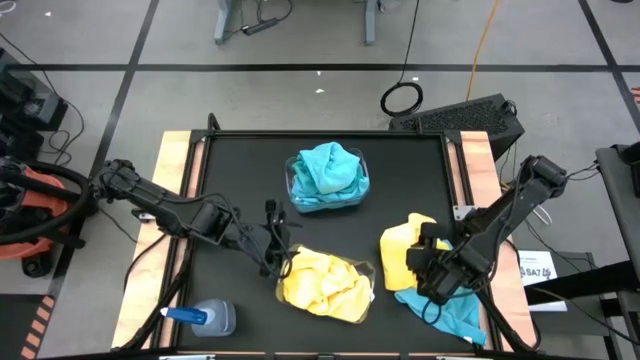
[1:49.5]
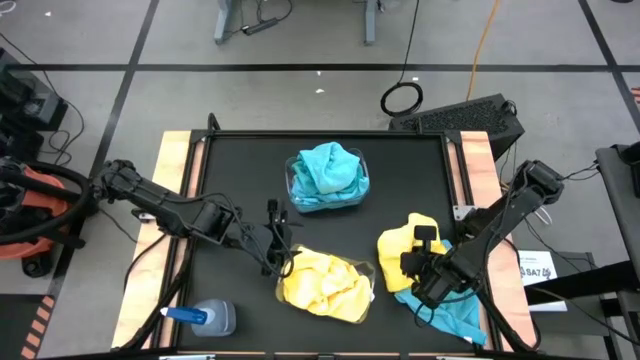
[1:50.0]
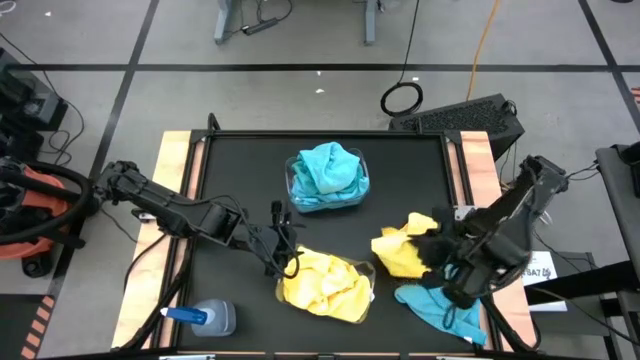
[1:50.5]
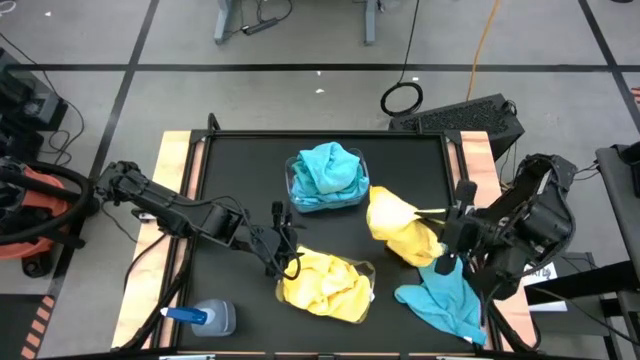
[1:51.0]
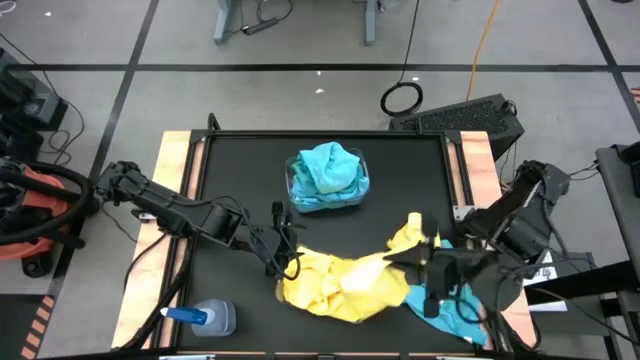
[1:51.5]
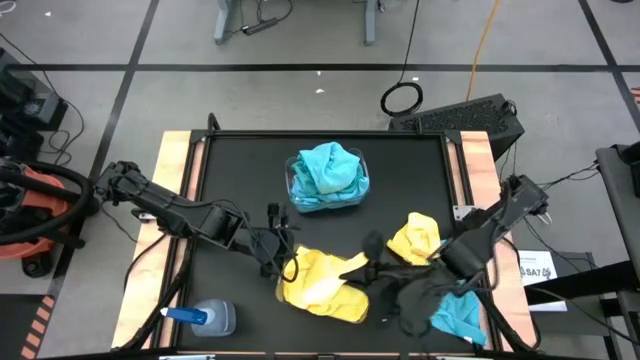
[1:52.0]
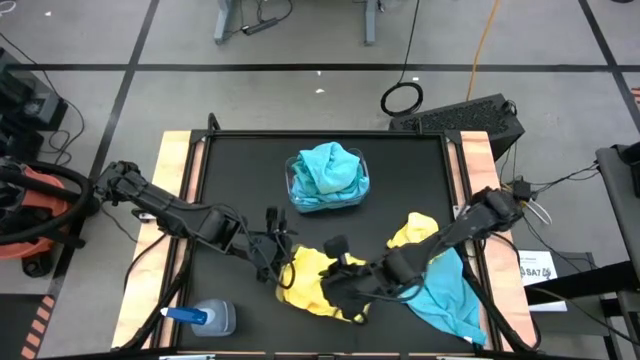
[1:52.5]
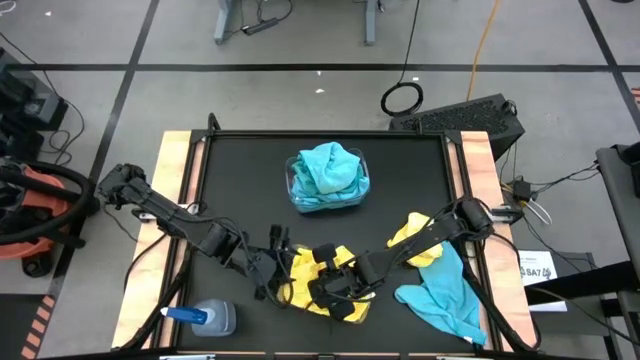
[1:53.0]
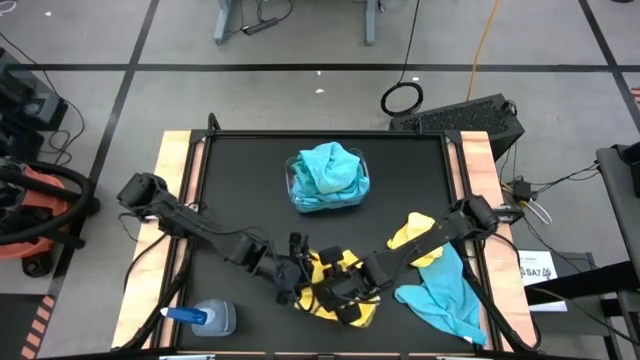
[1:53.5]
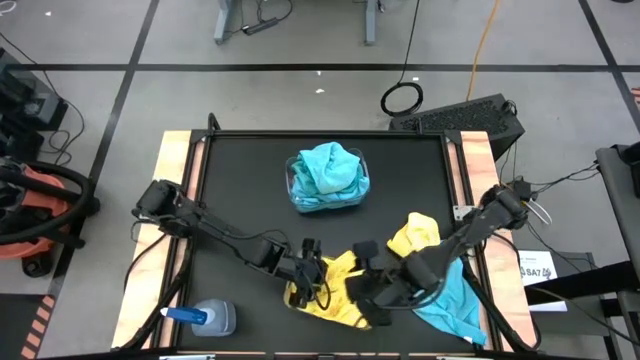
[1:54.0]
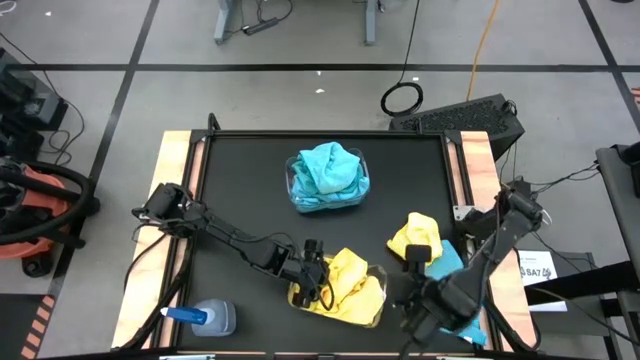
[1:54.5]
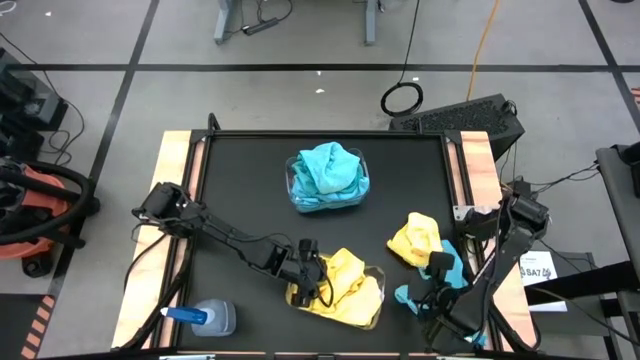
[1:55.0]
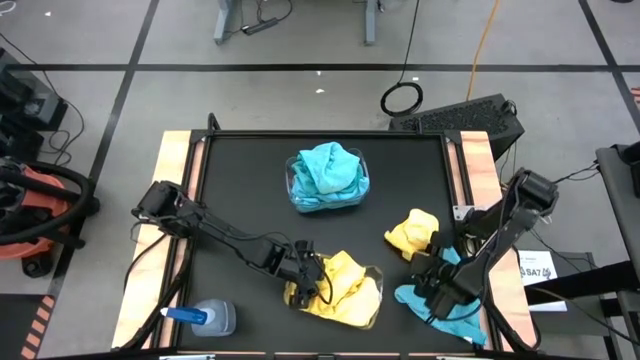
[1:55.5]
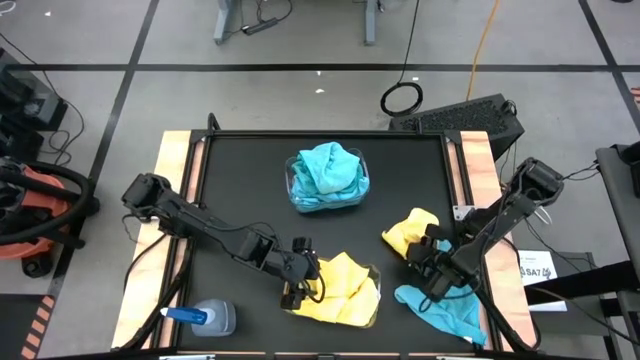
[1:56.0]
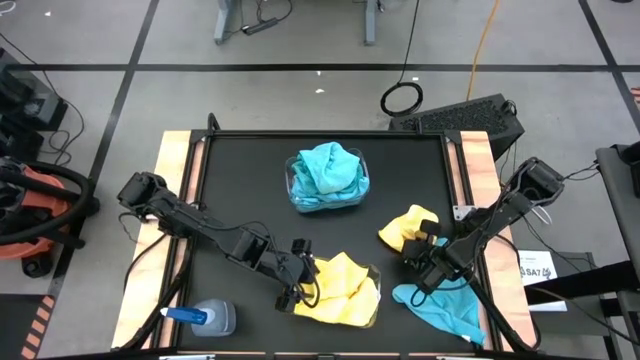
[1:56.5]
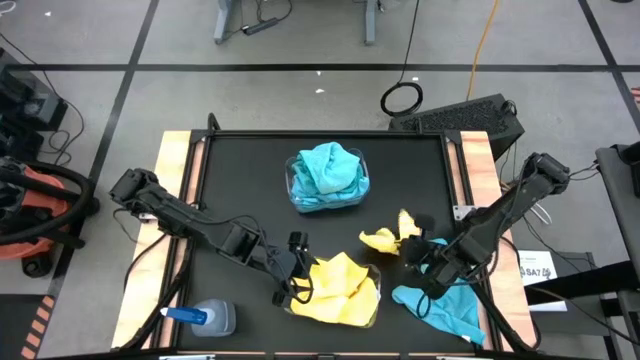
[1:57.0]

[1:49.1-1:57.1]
Task: Sort microfiber towel by color & place in baskets
Put the yellow microfiber towel into the bottom transparent bin

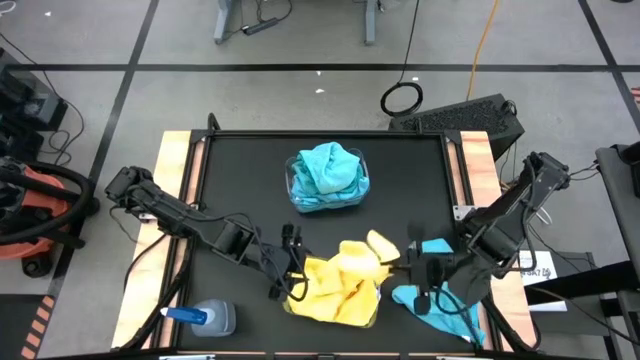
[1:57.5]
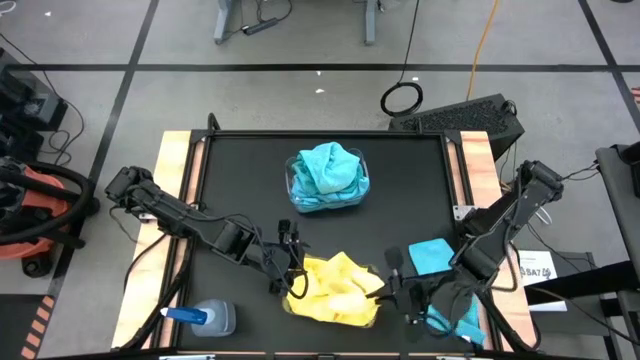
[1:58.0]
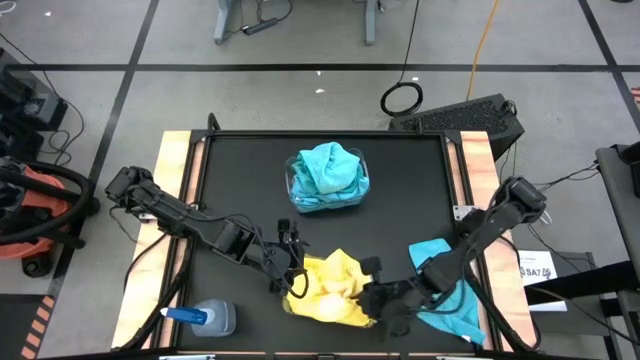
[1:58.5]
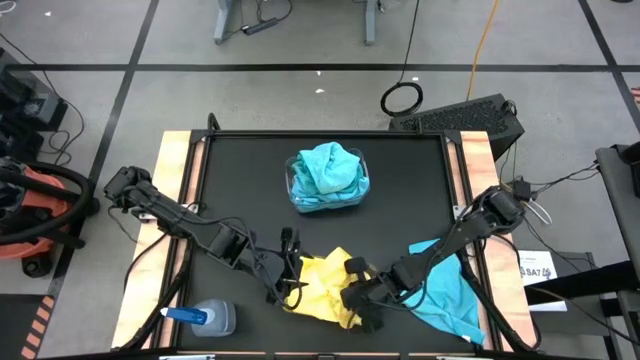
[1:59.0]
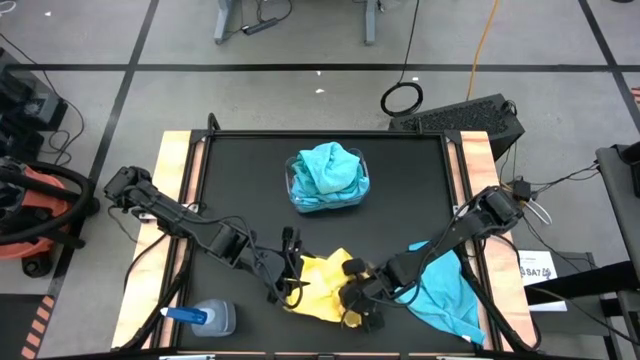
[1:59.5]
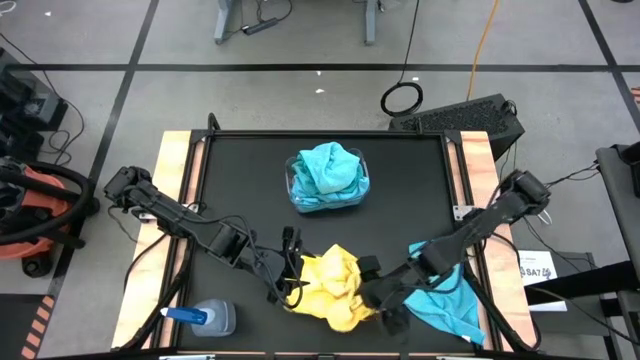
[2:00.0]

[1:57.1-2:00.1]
Put the yellow microfiber towel into the bottom transparent bin

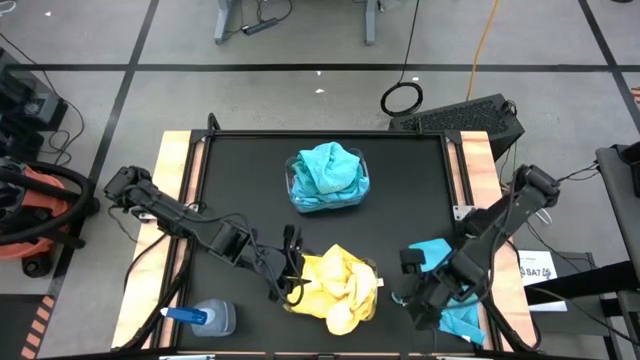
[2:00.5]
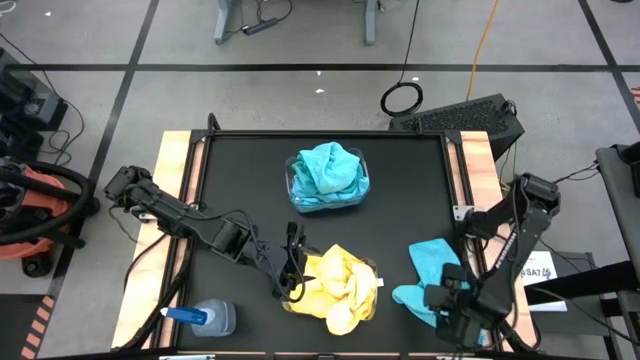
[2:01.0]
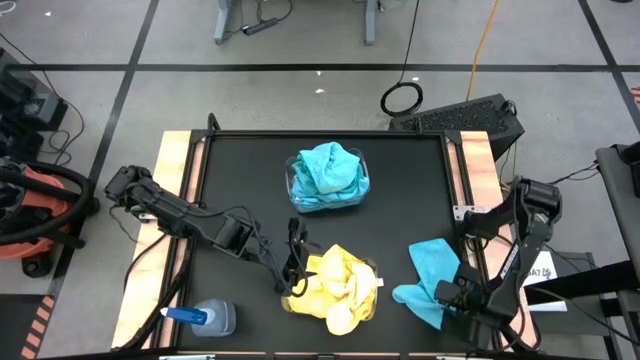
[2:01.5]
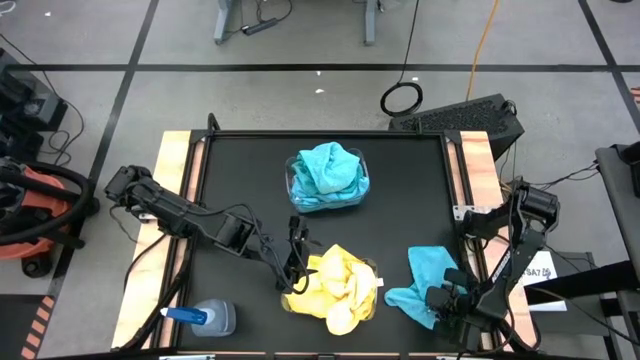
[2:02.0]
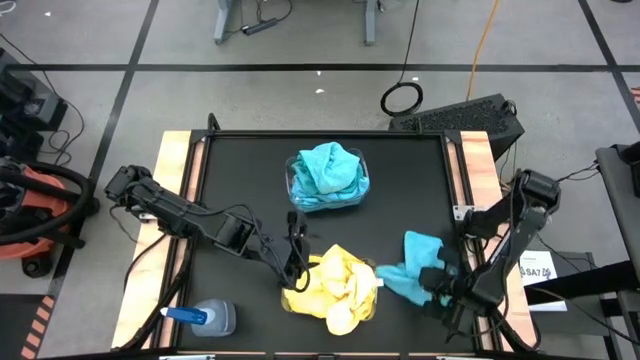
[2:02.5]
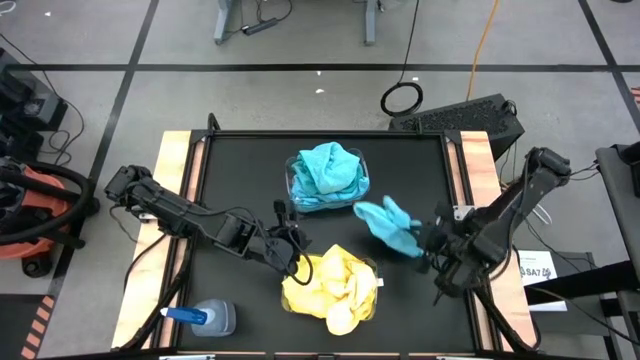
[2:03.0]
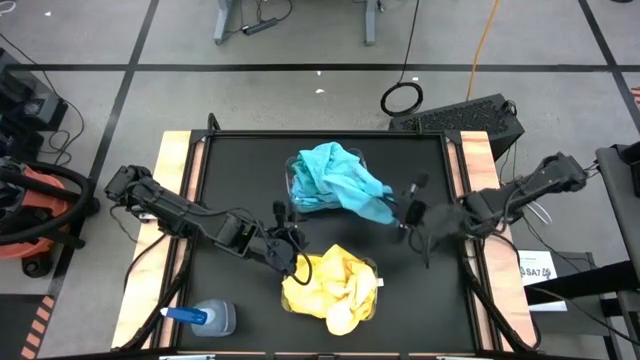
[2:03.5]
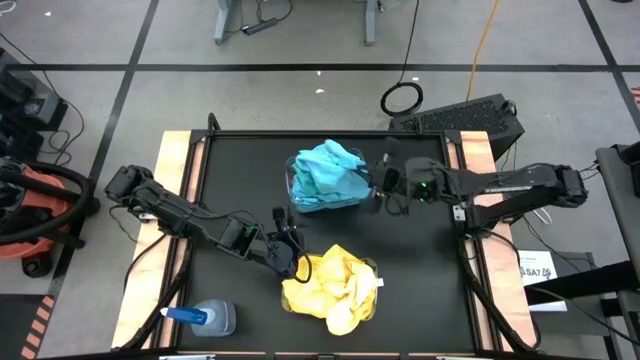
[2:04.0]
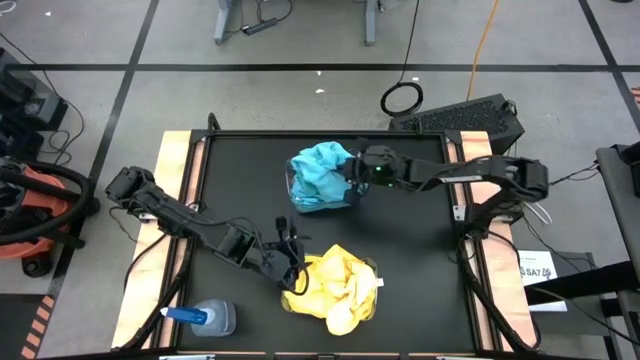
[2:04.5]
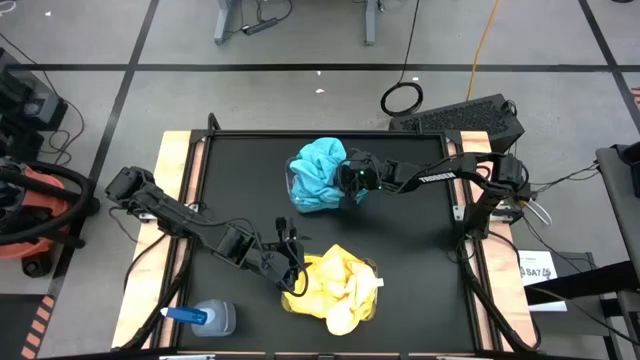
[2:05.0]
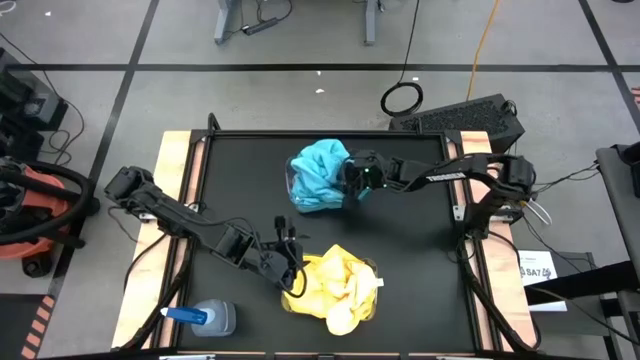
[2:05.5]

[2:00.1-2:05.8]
Put the blue microfiber towel into the top transparent bin

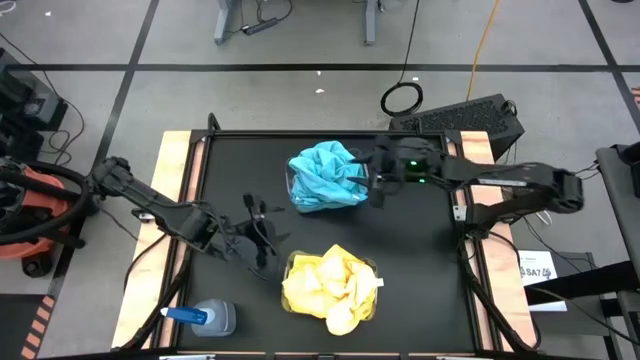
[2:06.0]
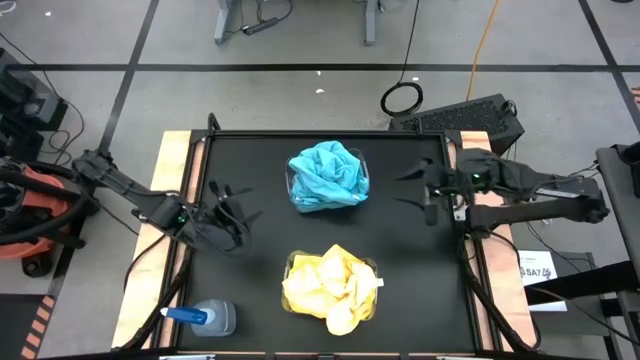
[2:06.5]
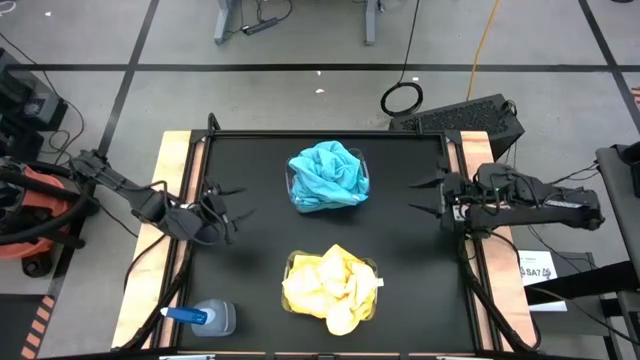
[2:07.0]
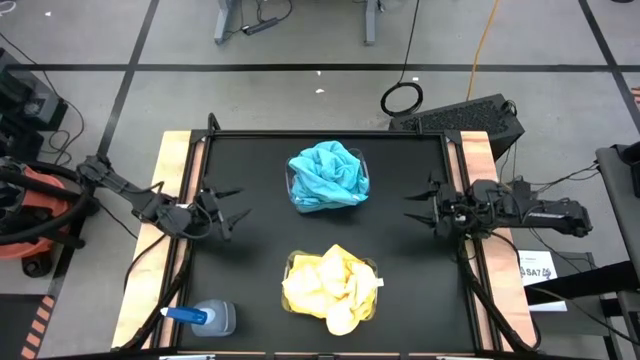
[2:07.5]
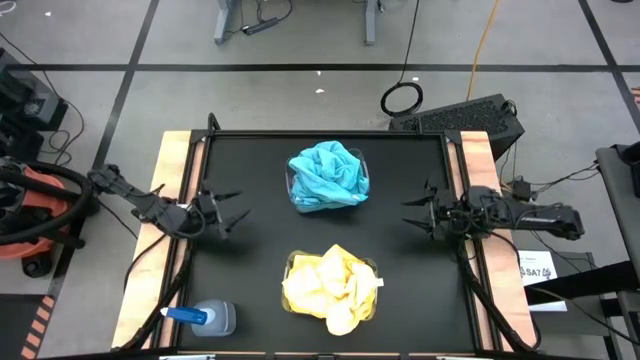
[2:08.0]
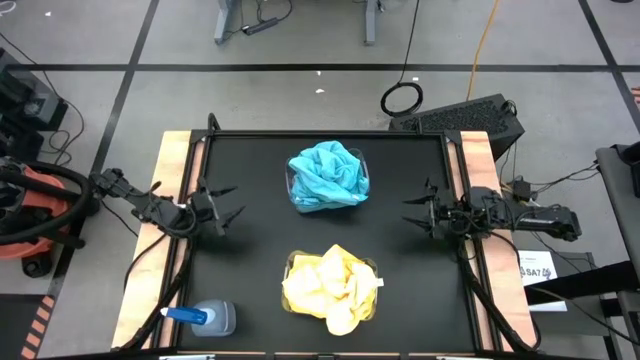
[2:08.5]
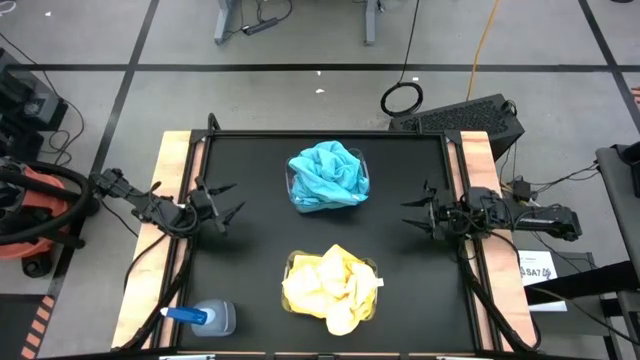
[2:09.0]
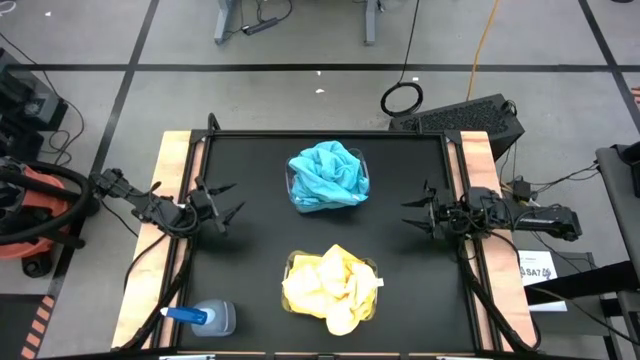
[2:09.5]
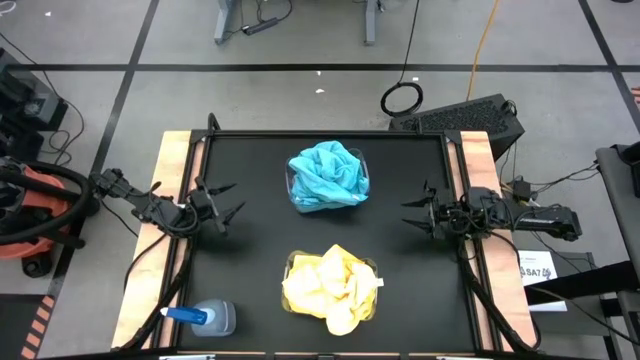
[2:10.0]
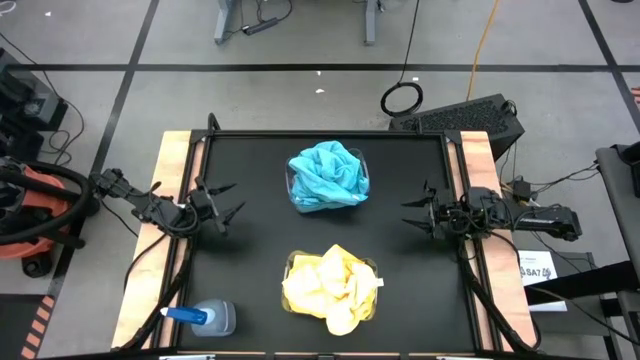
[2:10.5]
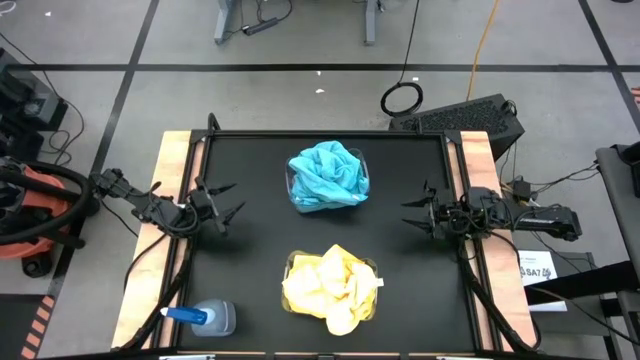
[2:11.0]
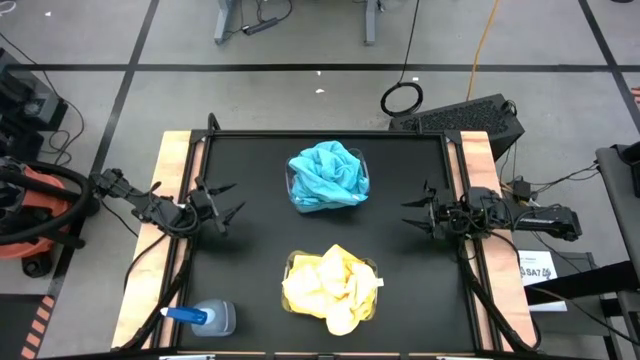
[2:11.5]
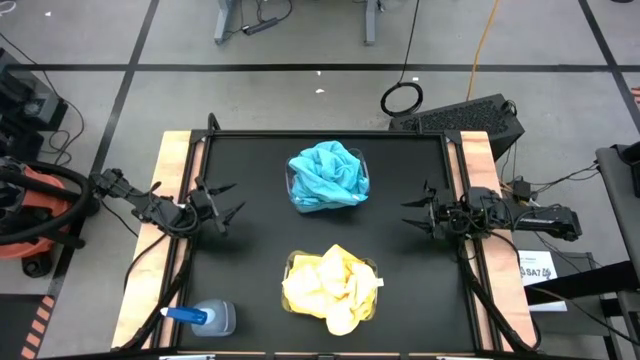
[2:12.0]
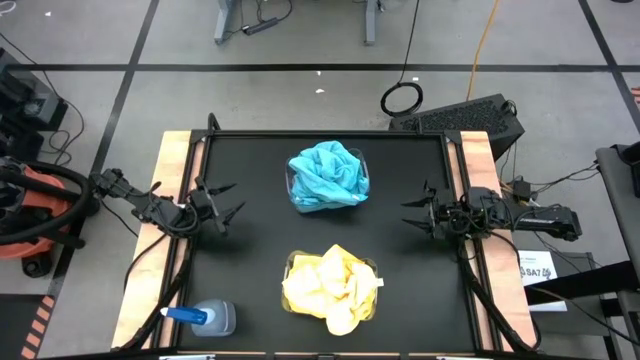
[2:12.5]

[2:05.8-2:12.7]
Return to Home Position
